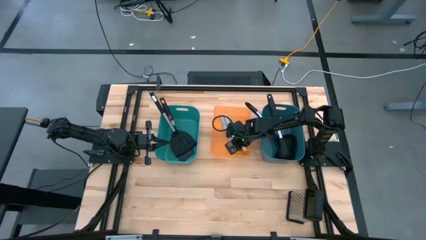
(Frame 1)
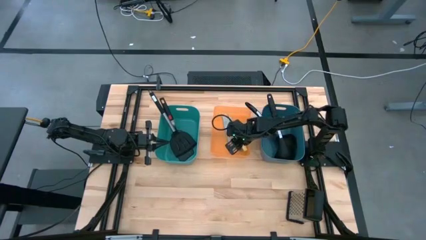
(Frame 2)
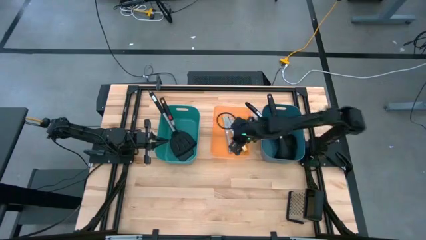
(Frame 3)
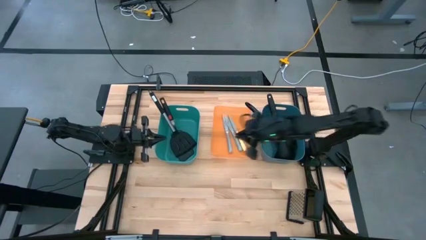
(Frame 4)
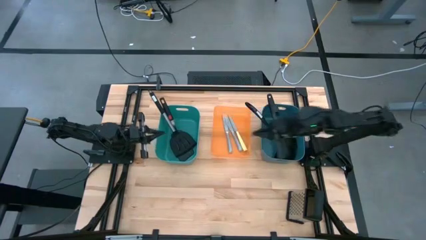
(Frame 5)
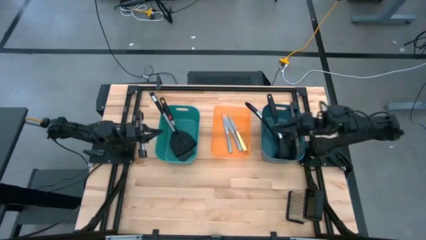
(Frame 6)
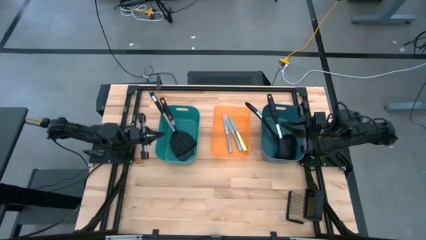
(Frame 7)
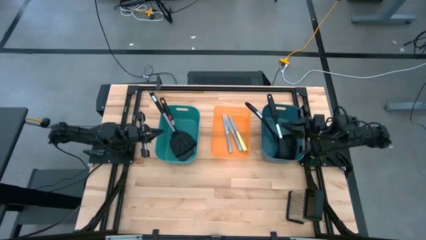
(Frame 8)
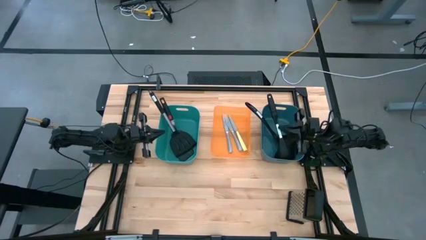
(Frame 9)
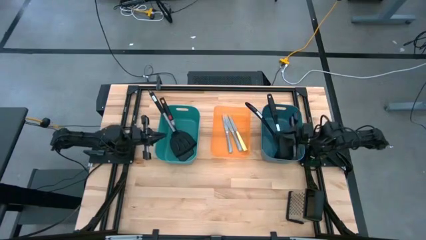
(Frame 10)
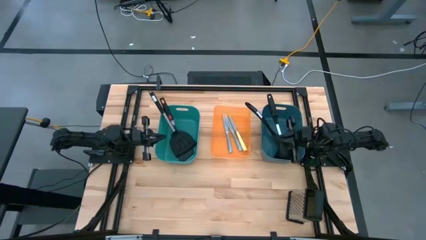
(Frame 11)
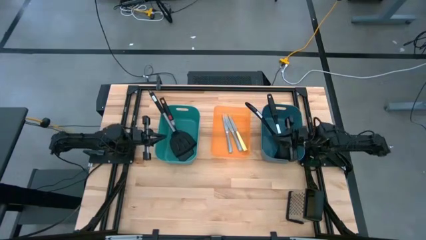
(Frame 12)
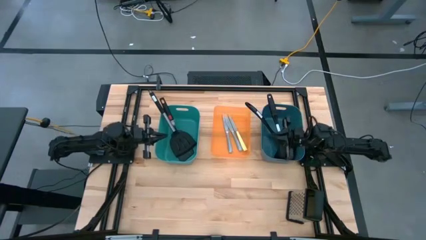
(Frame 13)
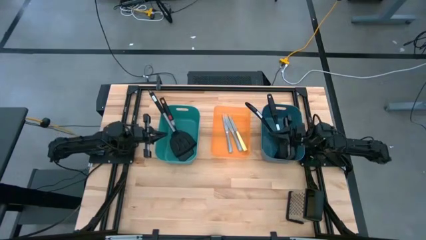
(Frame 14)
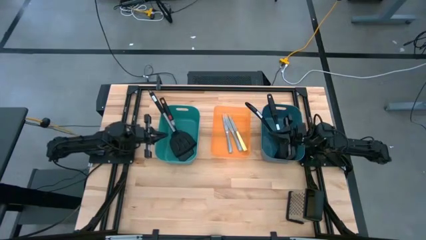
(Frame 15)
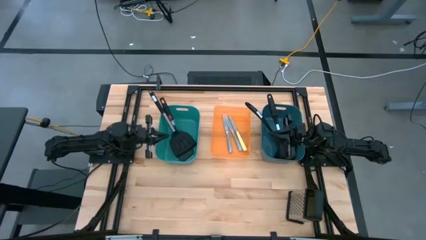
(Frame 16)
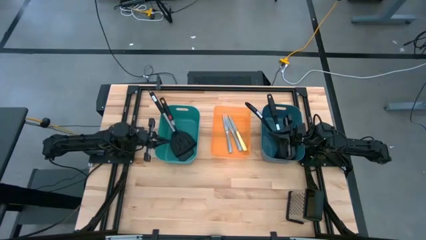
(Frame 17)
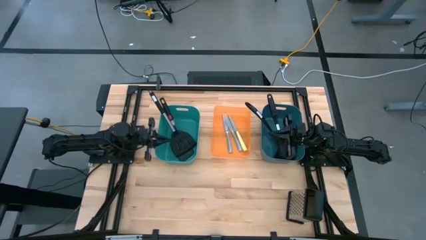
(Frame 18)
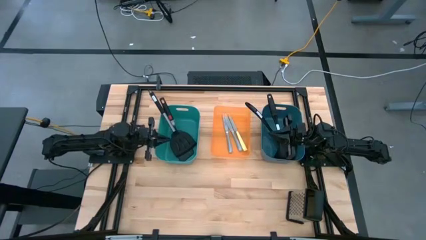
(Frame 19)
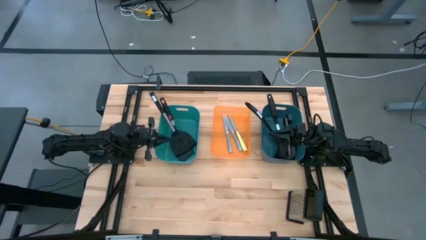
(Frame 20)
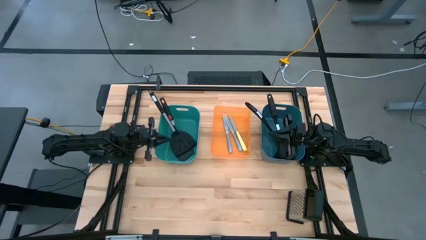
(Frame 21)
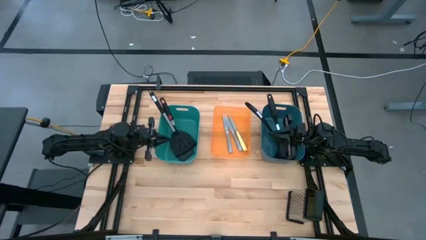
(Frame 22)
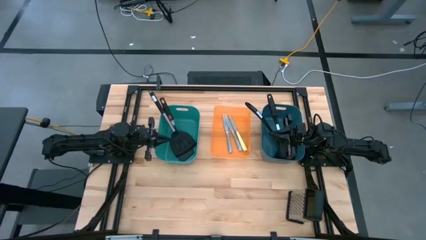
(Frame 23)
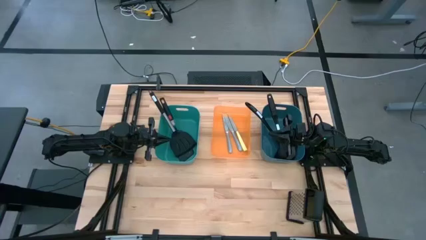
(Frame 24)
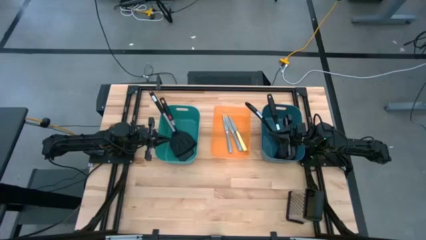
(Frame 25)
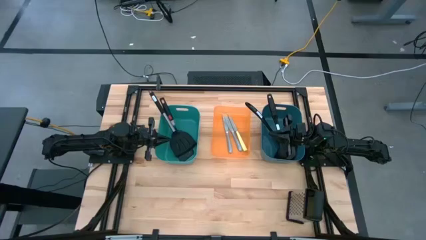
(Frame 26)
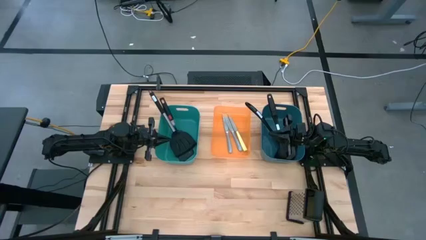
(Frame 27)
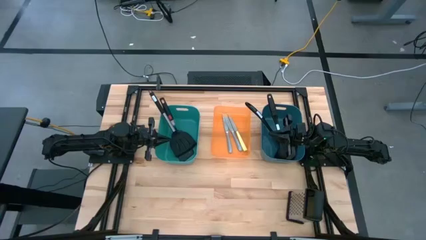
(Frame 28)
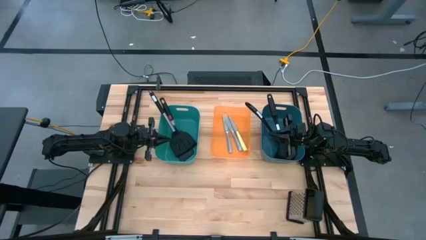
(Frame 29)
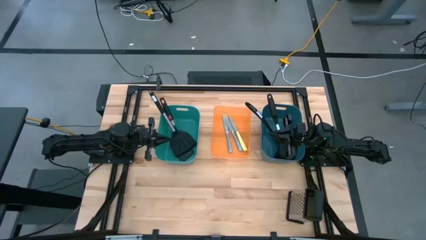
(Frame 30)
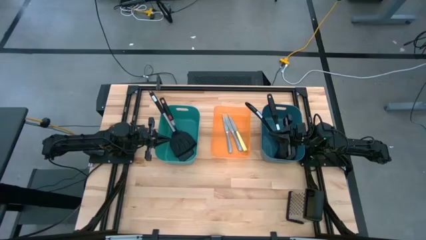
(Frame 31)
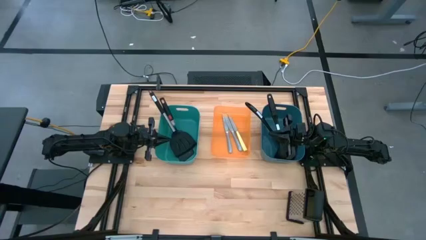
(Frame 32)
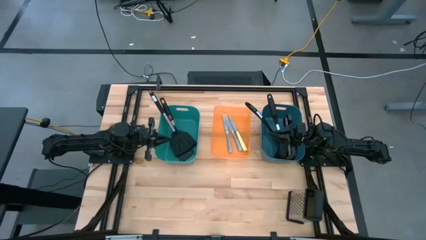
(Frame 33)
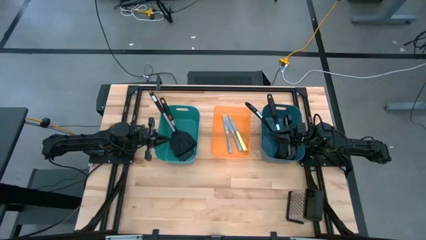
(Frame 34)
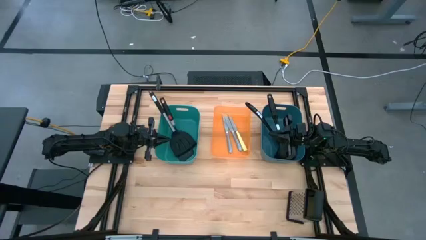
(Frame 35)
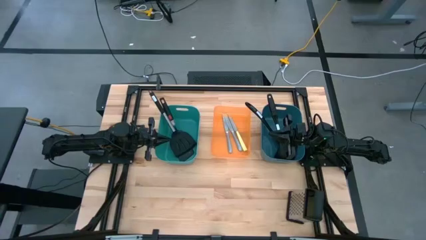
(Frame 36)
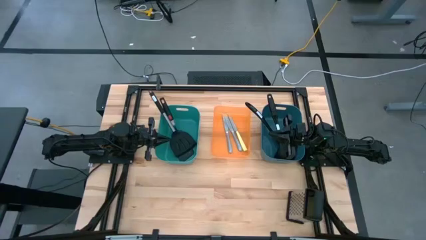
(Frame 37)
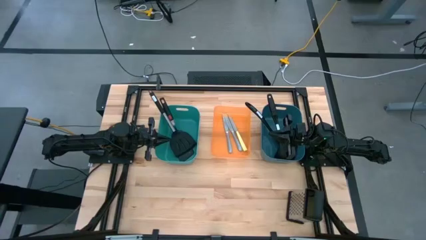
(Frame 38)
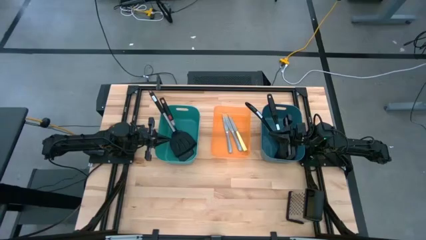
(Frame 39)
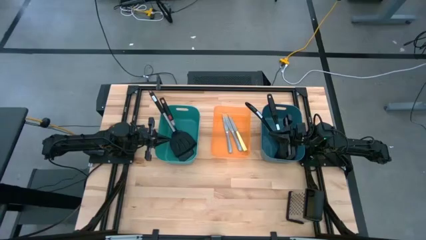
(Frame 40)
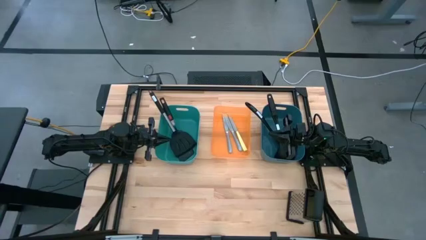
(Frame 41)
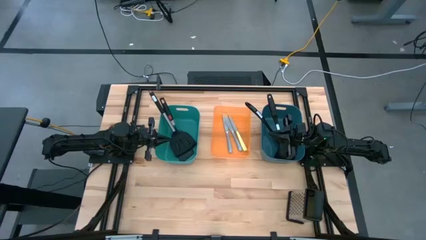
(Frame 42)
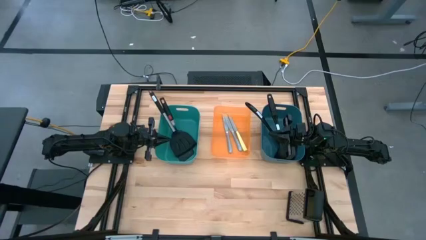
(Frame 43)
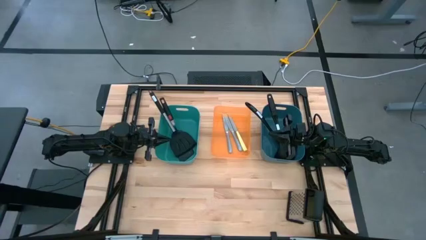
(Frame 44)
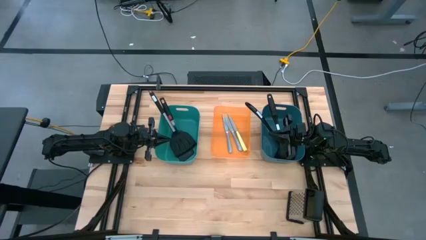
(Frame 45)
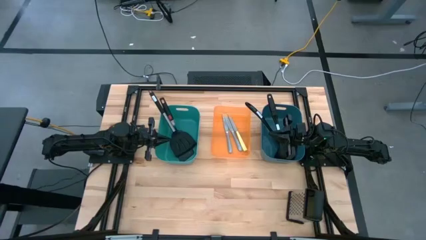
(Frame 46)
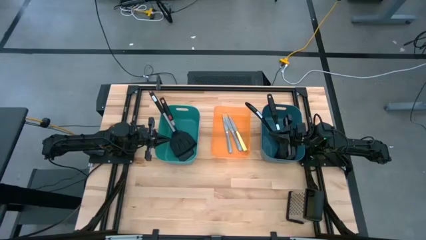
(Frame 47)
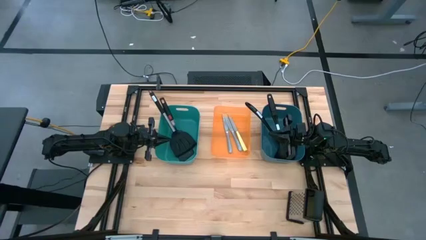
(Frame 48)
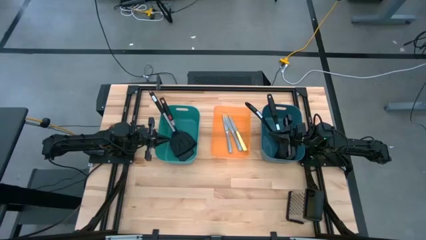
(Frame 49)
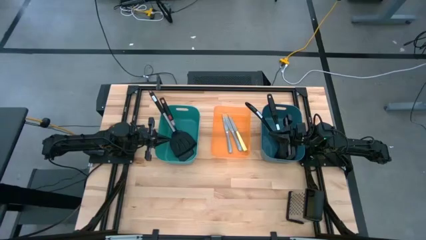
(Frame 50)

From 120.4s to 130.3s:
Task: Pick & Place Kitchen Items
Return to home position

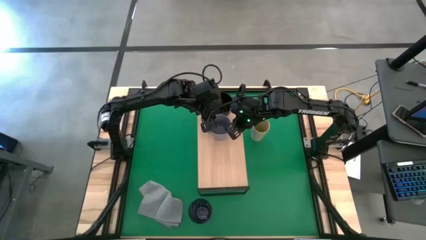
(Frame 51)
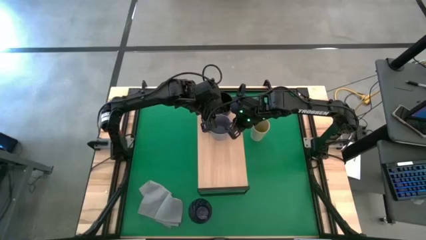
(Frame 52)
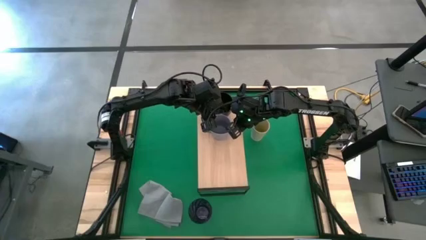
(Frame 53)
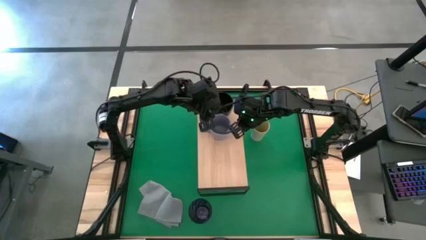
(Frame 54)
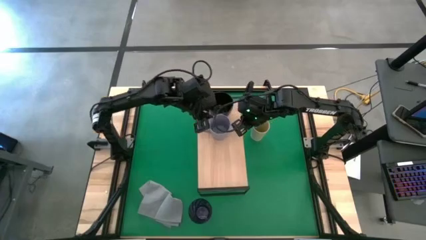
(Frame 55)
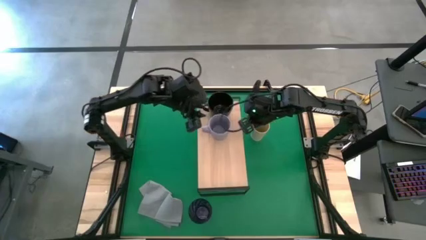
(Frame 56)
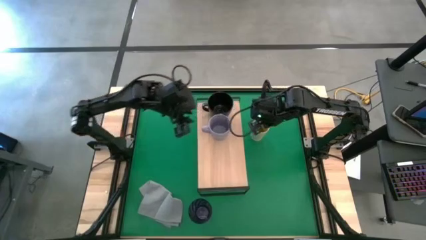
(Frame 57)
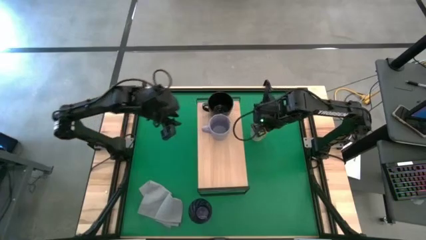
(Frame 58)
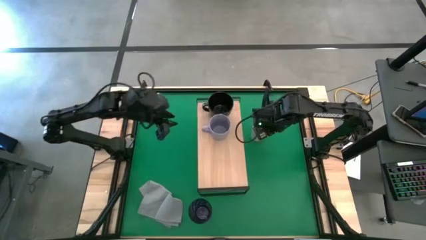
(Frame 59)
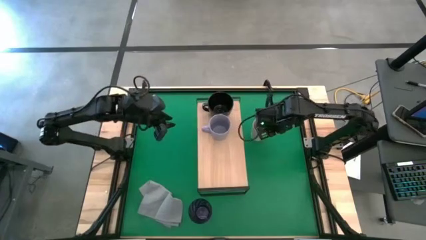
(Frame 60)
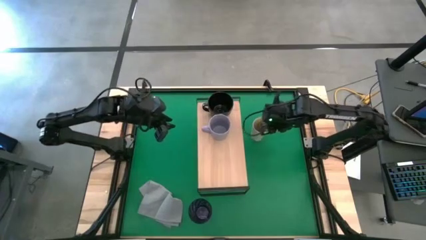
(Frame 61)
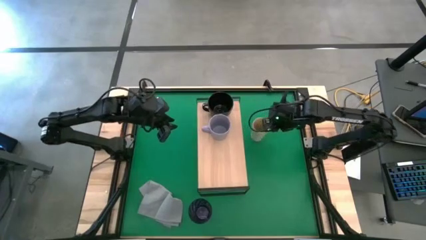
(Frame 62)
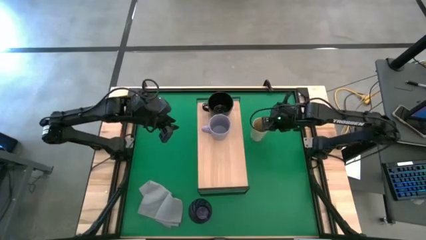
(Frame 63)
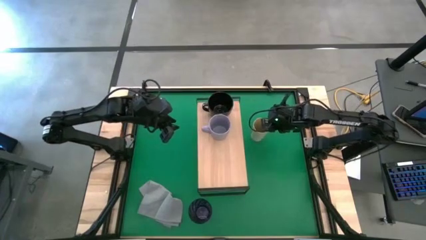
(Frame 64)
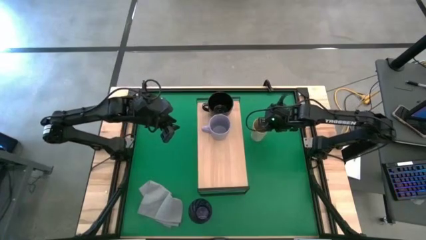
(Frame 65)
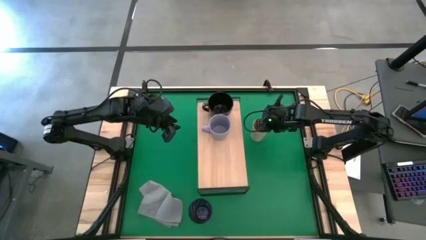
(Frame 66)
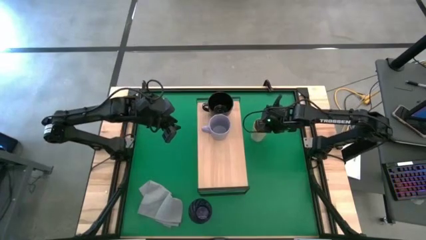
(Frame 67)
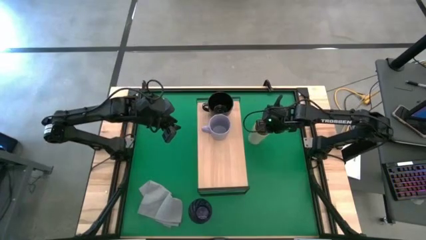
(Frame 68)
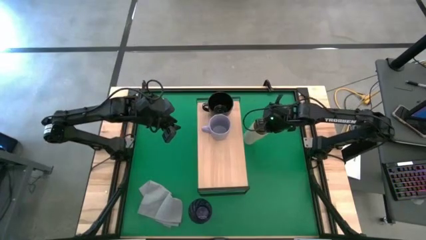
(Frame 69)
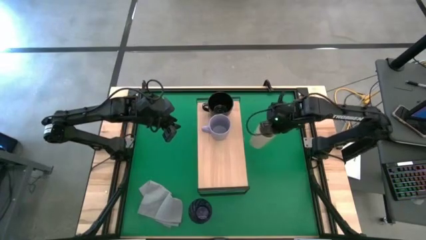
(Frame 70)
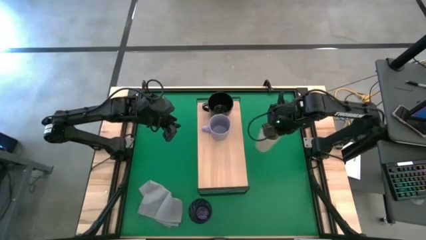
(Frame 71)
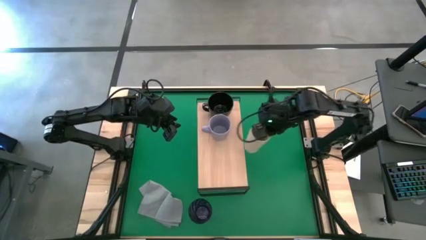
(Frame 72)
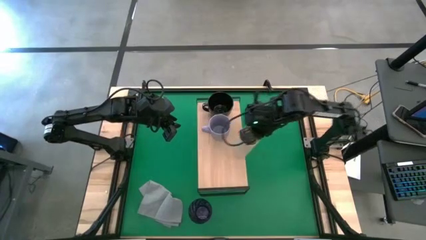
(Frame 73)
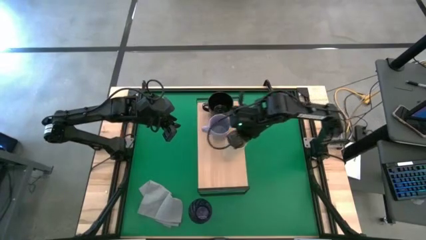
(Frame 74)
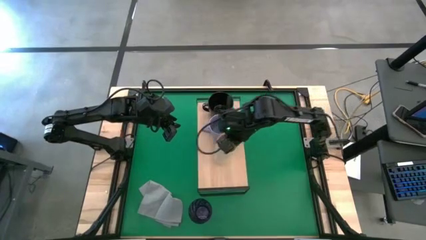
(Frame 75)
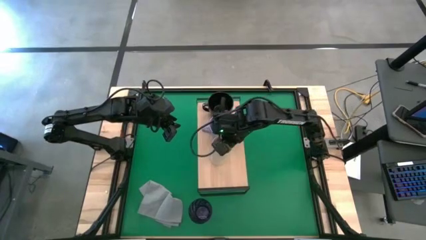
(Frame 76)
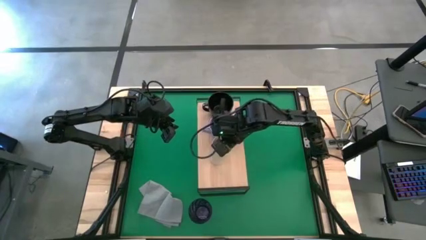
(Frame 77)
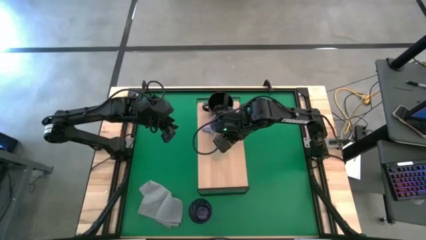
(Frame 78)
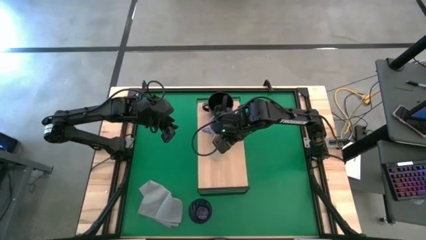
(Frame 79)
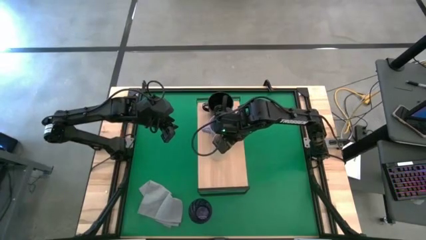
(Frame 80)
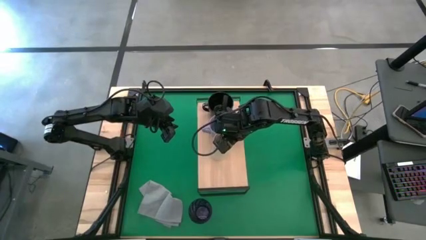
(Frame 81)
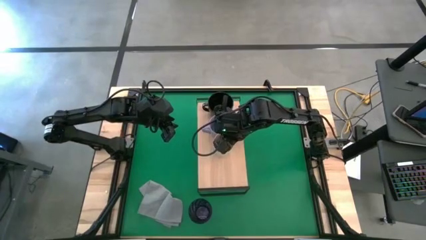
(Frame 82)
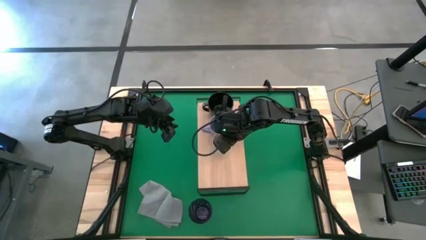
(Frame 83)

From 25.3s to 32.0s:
Task: Stack small to large cups/mugs on shelf
Put the white cup on the shelf
